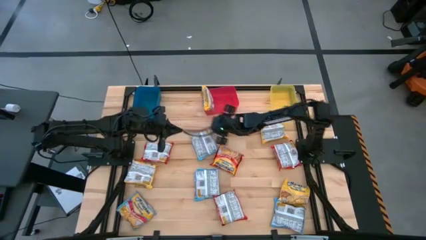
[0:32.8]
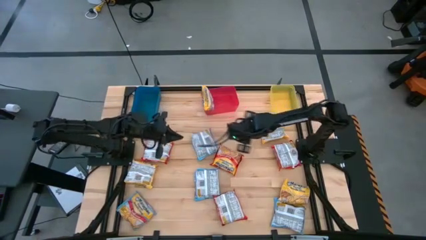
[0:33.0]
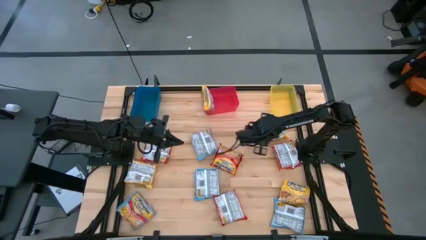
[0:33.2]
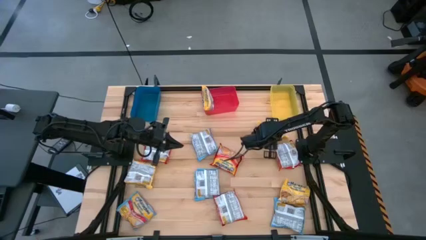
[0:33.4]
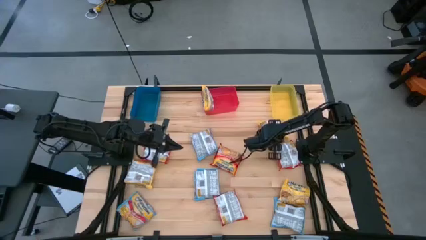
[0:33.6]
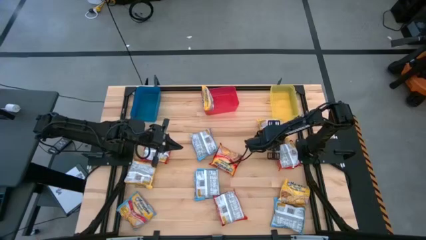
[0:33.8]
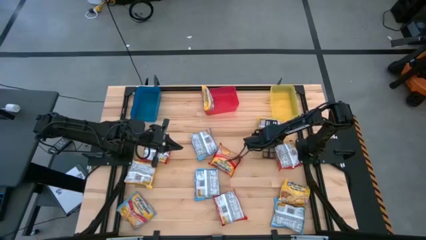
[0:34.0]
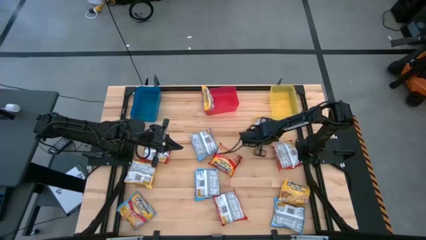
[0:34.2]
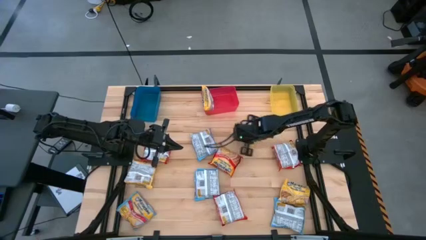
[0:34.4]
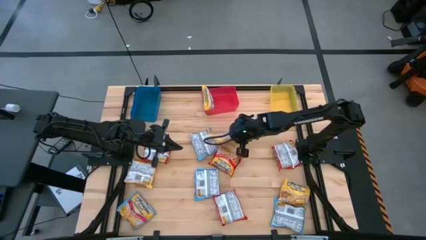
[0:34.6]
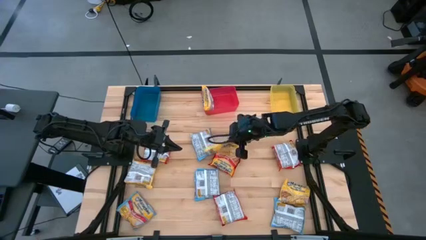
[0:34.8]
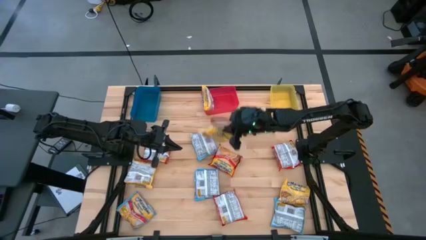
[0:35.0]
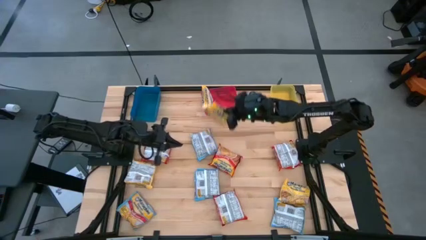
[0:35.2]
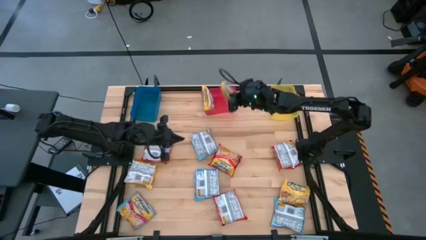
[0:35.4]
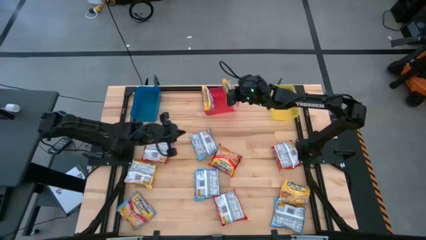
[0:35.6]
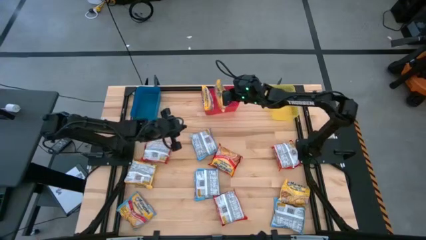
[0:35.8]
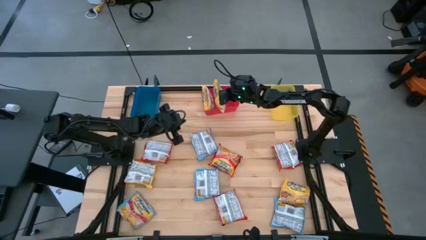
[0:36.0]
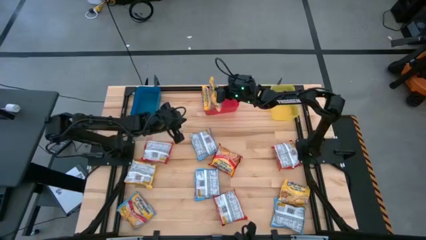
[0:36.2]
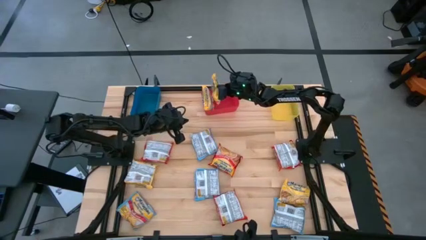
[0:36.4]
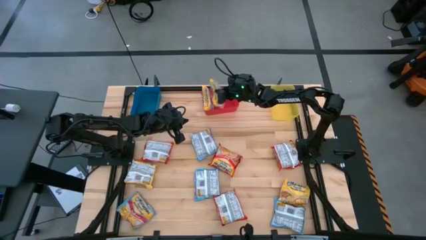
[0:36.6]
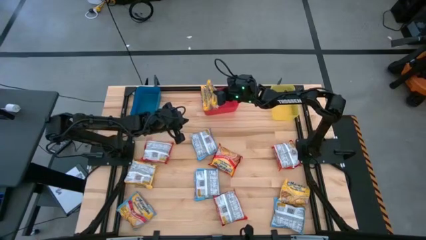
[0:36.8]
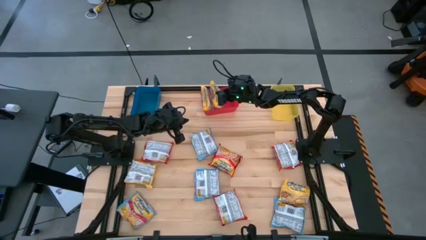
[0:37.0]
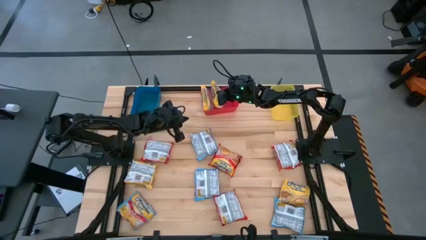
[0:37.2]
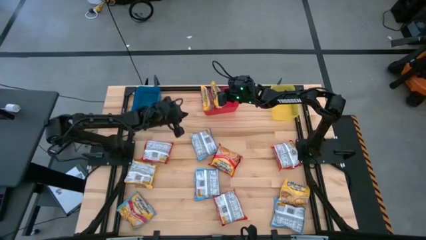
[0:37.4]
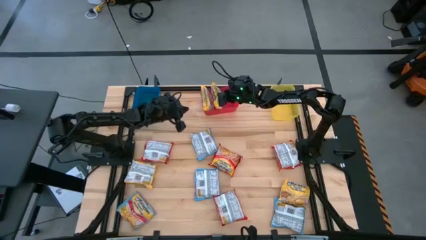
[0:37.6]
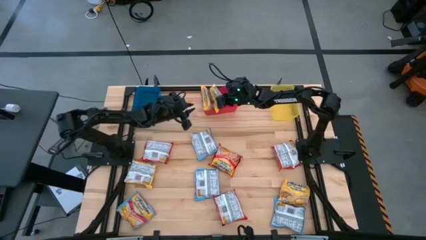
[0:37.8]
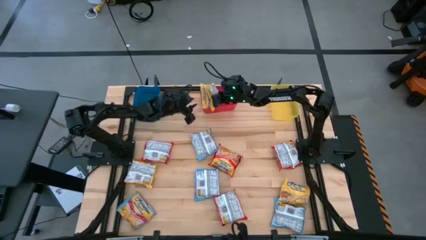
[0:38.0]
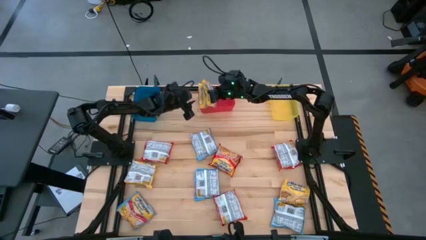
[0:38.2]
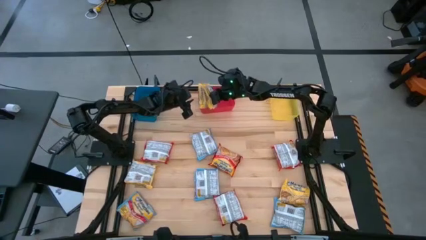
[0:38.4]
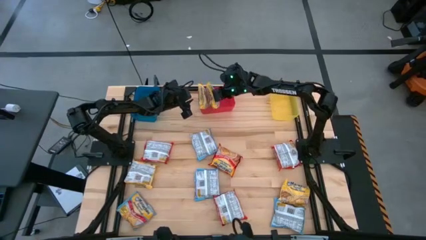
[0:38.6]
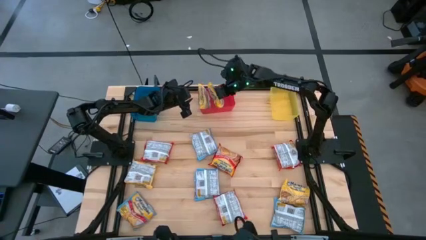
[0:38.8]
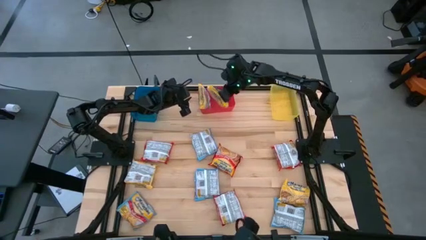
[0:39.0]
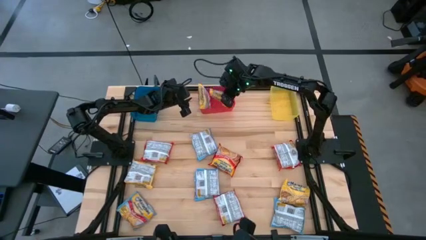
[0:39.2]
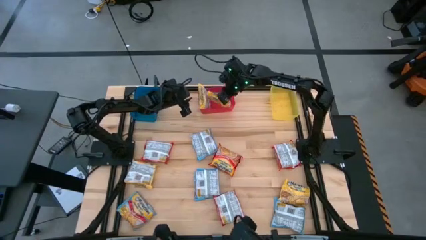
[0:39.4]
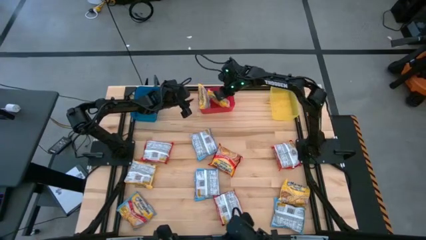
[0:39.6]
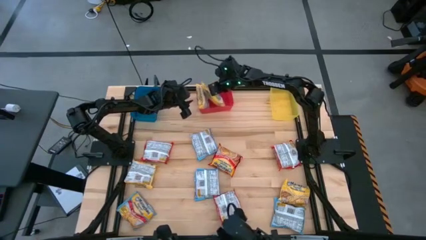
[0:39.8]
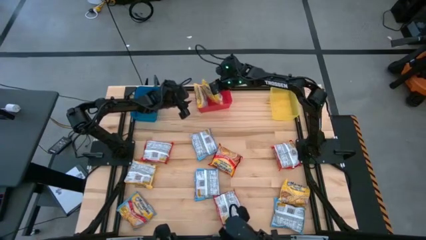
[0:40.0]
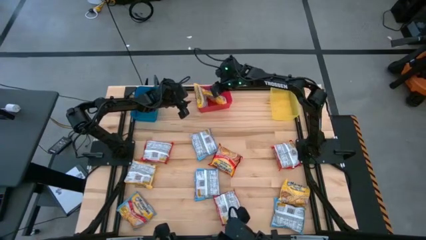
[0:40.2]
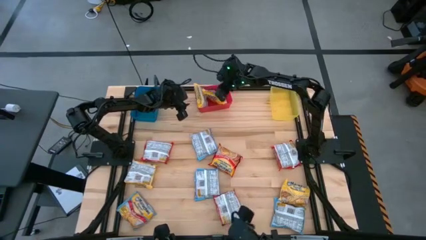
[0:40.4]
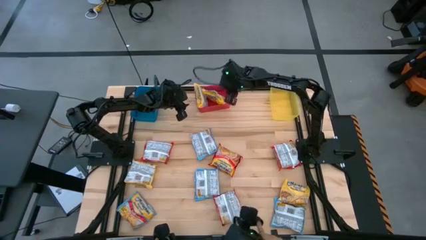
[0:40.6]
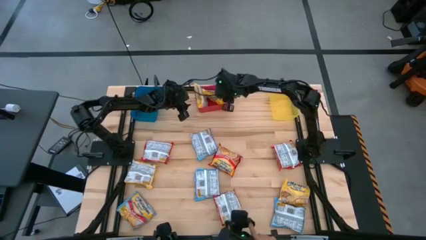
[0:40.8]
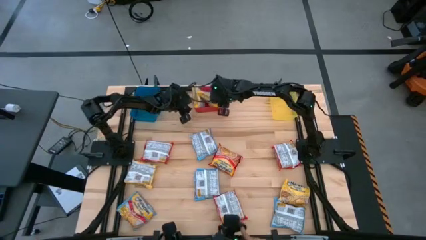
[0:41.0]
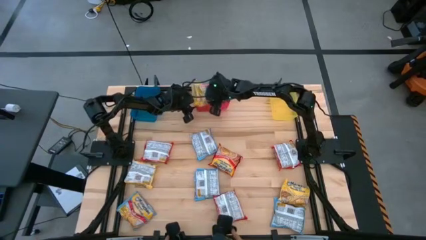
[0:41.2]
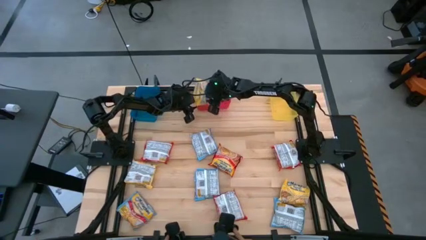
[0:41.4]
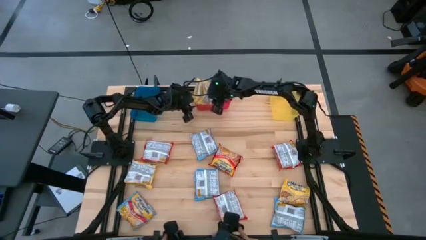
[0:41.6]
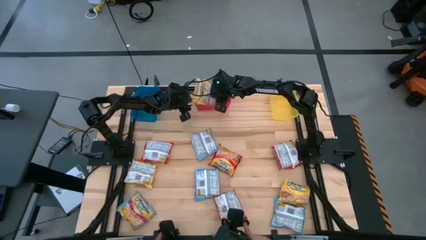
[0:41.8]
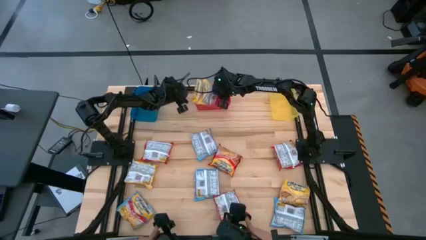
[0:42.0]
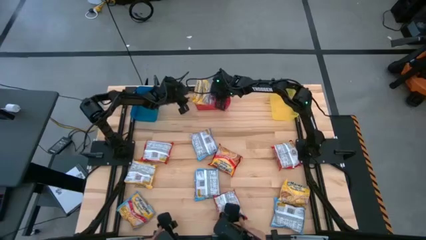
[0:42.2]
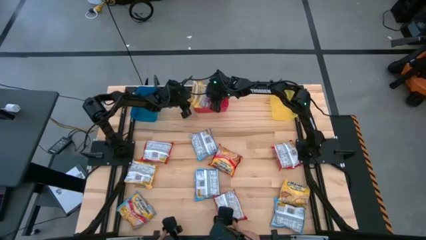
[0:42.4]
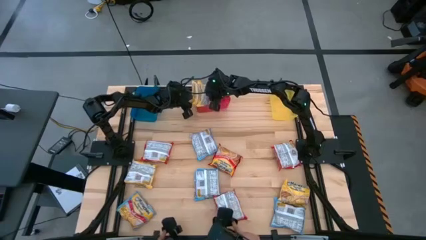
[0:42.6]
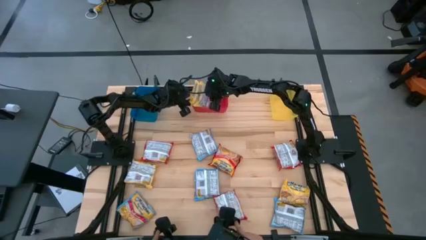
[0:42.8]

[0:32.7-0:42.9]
Task: Sort Maruchan noodles
Put the top yellow noodle pack into the red bin

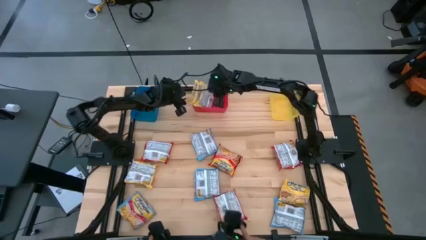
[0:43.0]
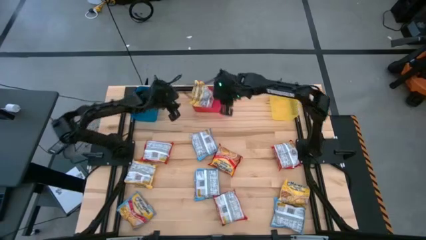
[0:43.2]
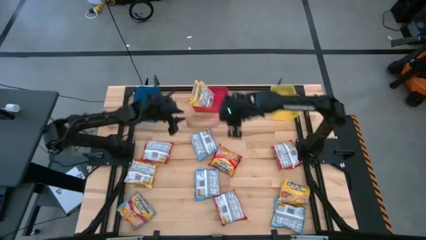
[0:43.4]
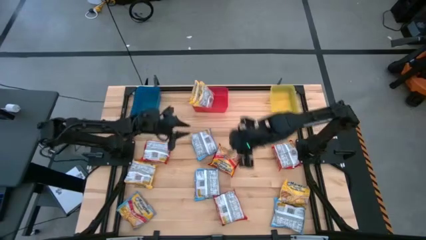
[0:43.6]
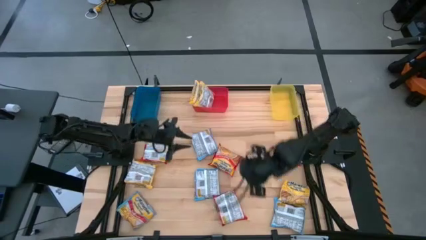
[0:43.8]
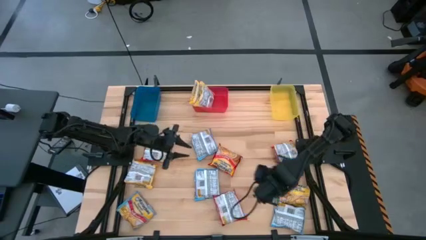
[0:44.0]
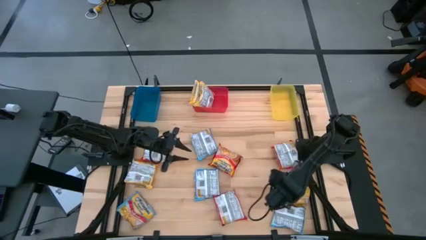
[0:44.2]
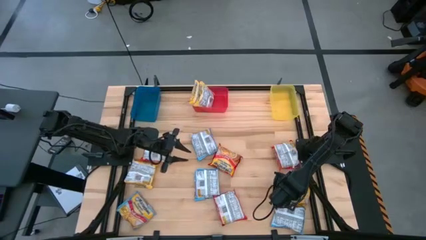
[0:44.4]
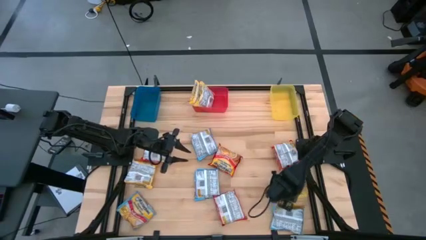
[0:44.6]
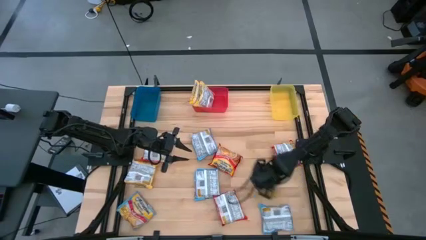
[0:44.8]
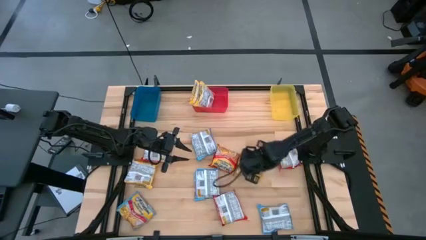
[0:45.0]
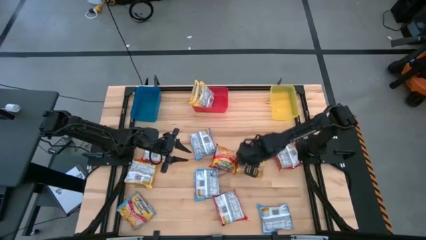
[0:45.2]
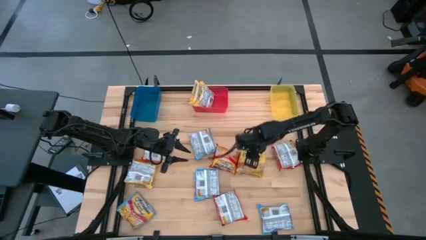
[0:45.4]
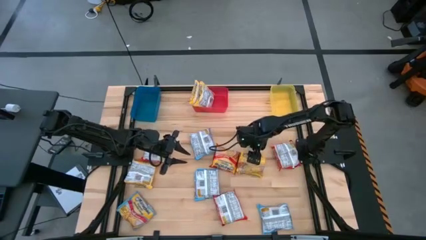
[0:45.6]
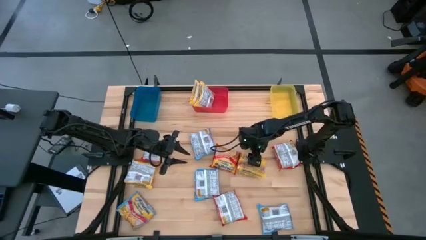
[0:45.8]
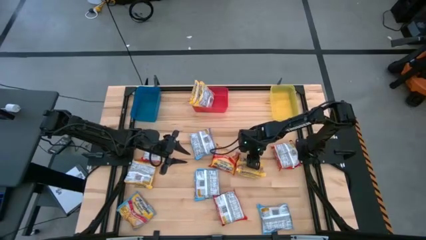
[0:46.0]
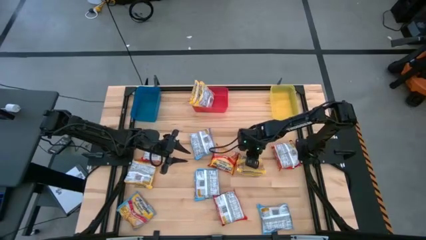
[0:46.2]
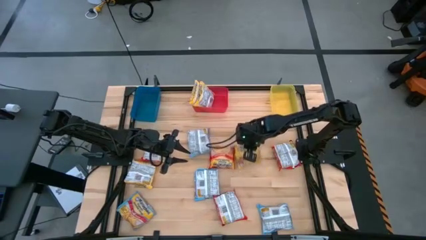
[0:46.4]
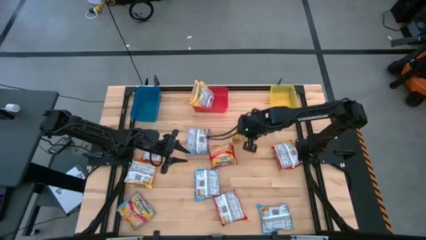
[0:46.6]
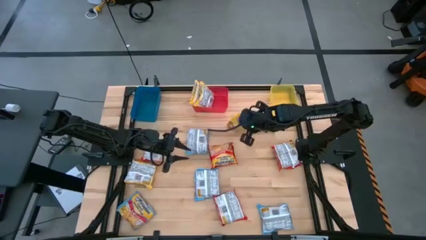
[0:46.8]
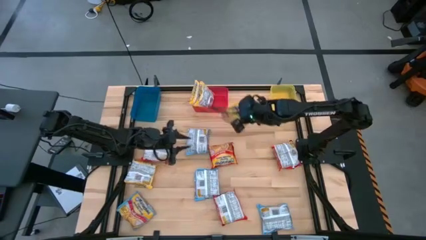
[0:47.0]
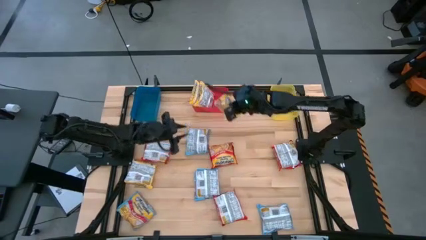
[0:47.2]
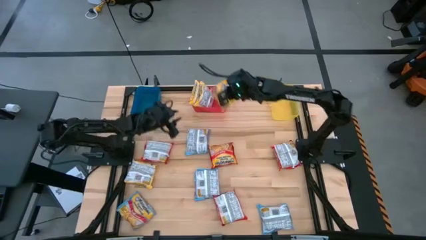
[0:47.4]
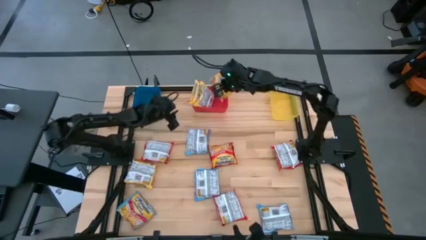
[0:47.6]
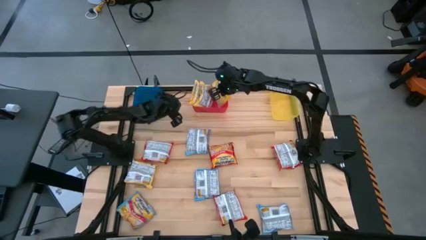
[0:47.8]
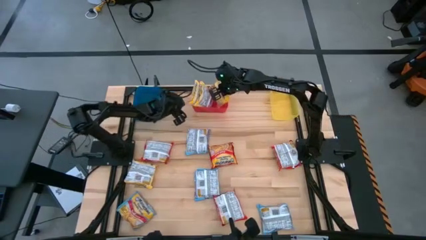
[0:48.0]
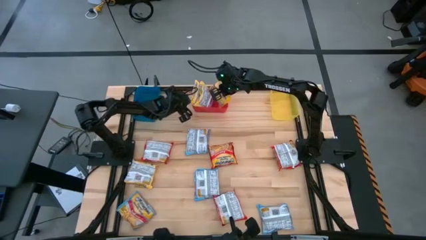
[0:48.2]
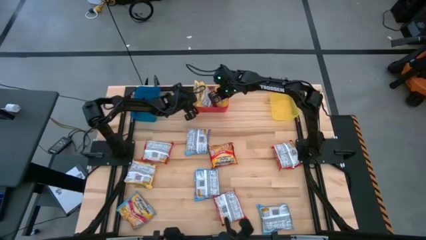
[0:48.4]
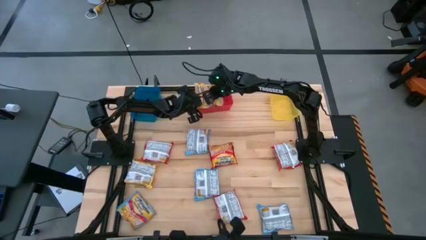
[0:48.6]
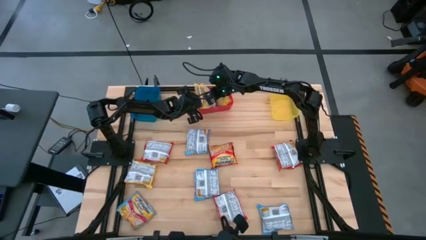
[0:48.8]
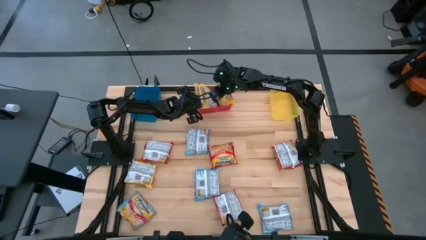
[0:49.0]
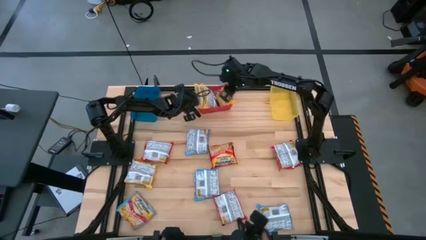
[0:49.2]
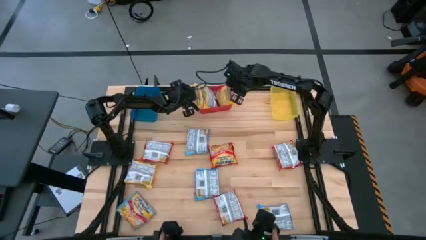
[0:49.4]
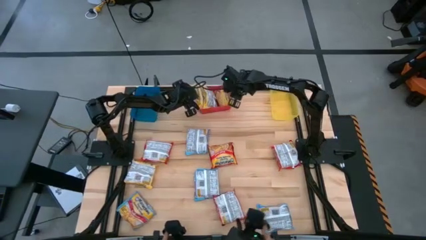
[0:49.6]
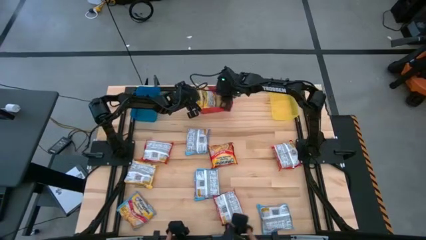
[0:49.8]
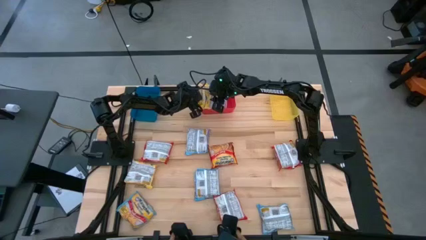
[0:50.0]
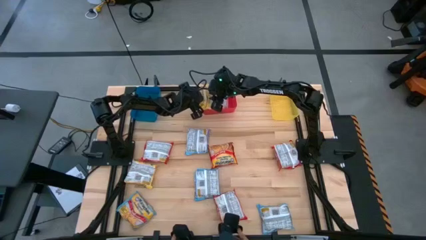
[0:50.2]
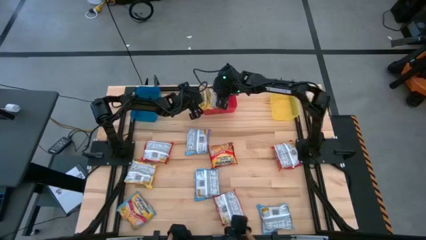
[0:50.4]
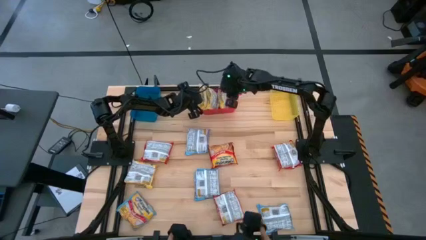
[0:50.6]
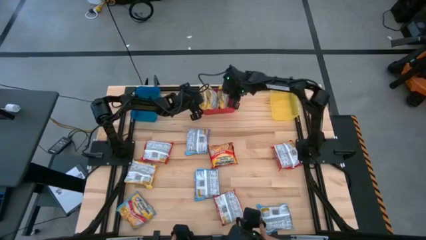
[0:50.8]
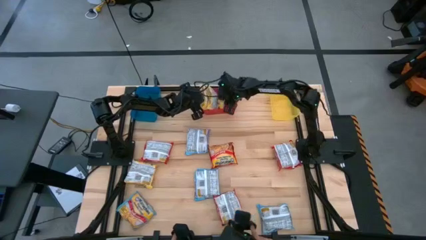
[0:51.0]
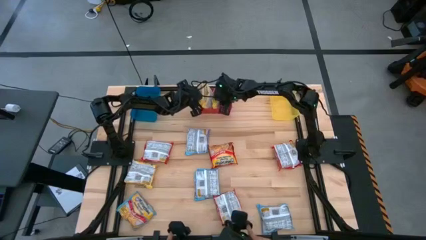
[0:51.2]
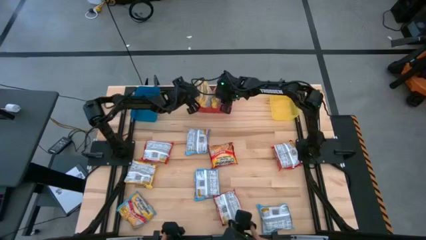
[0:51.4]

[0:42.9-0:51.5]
Put the right yellow noodle pack into the red bin
